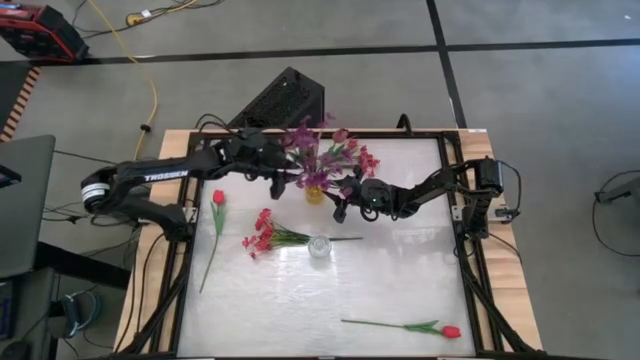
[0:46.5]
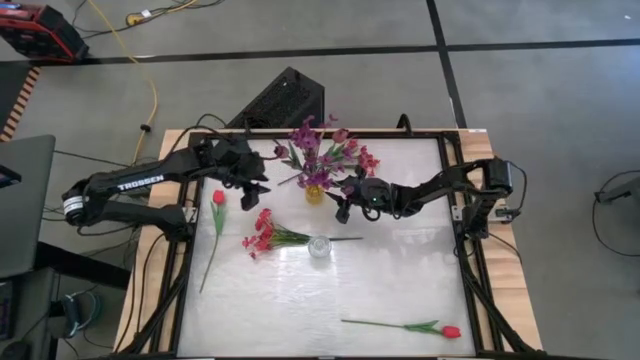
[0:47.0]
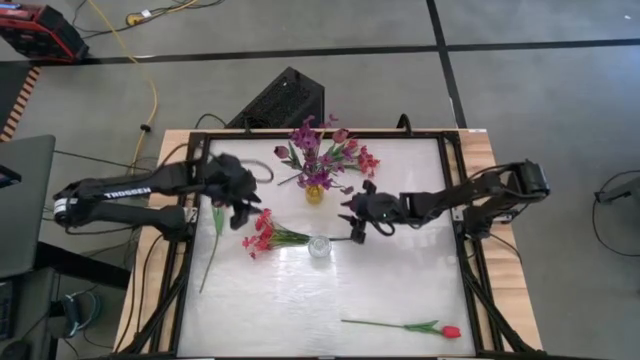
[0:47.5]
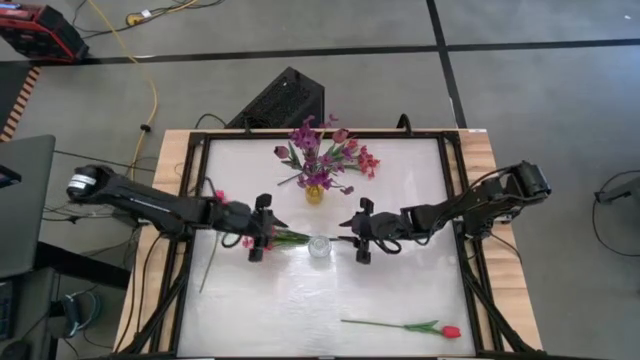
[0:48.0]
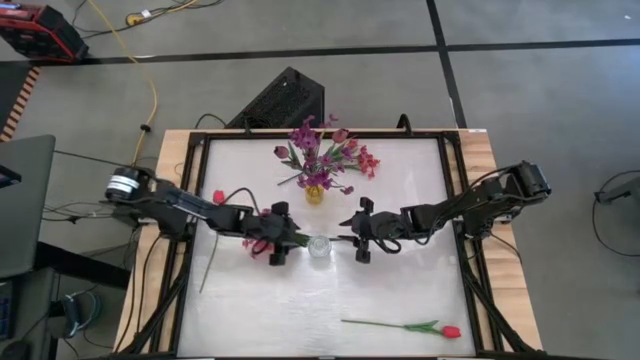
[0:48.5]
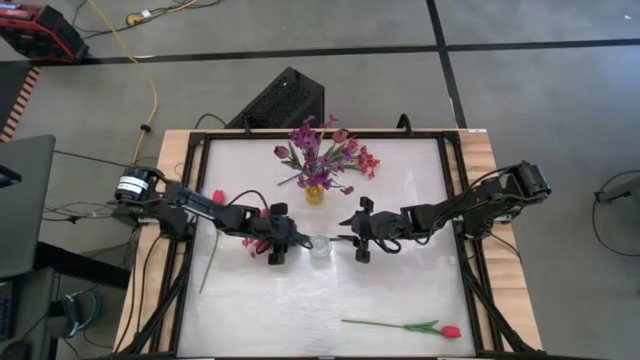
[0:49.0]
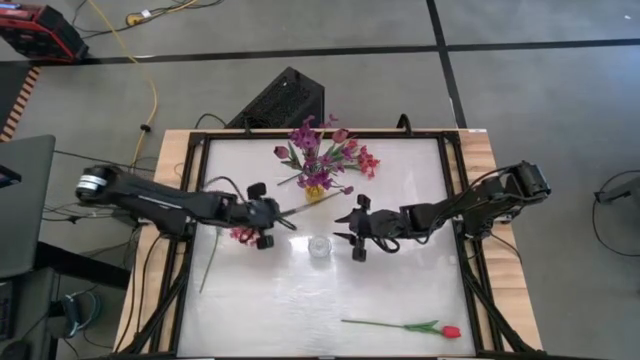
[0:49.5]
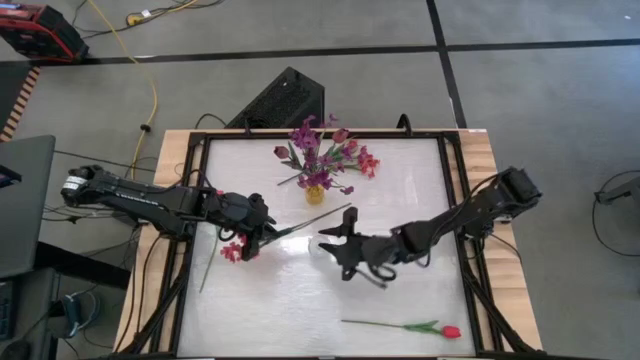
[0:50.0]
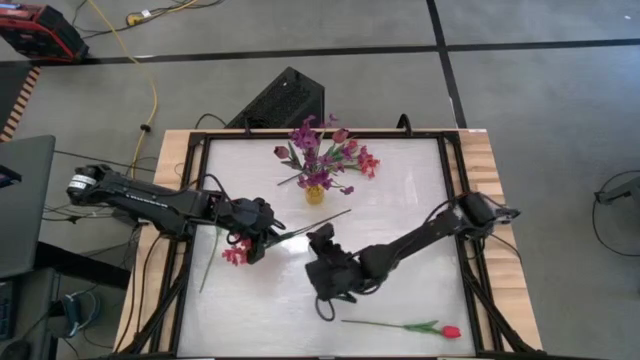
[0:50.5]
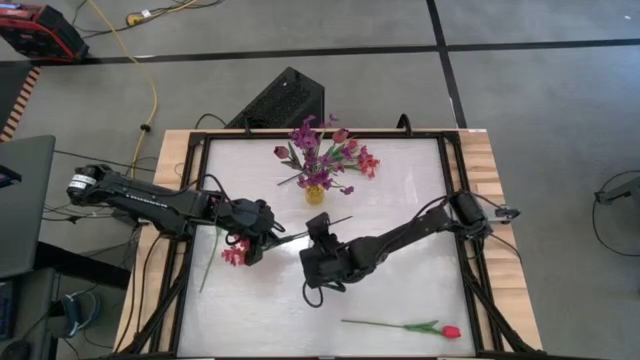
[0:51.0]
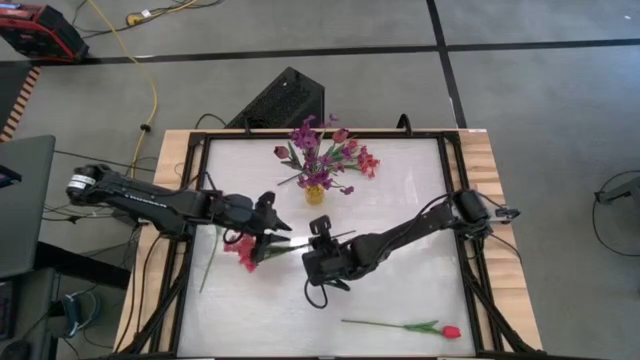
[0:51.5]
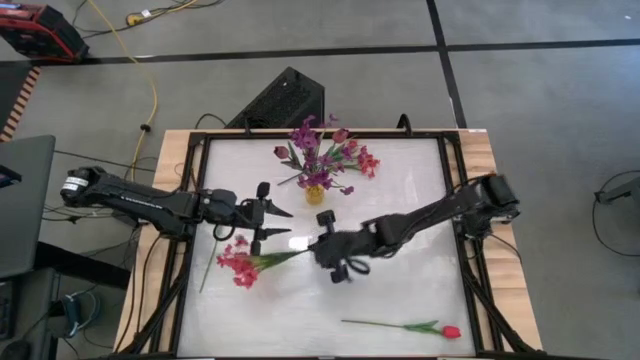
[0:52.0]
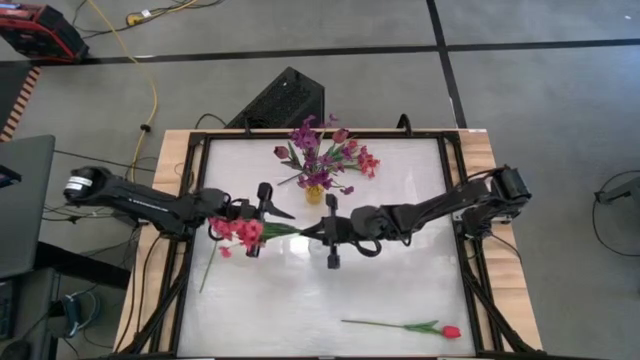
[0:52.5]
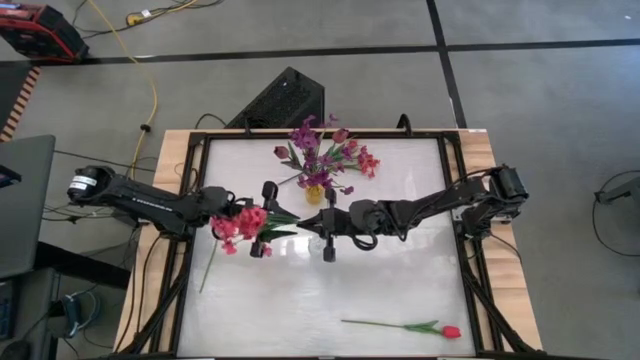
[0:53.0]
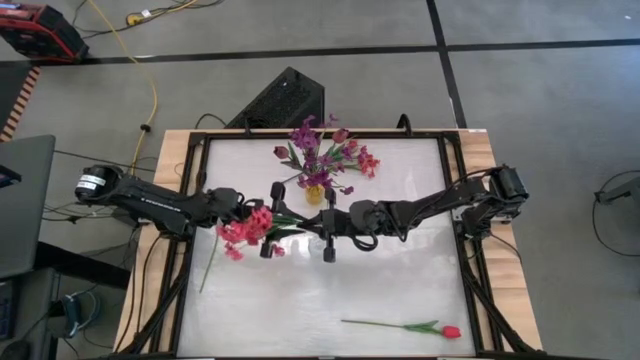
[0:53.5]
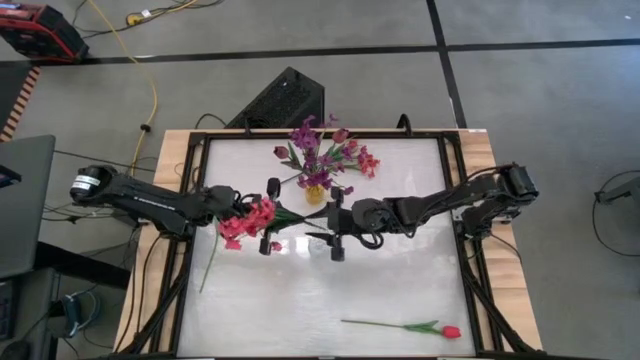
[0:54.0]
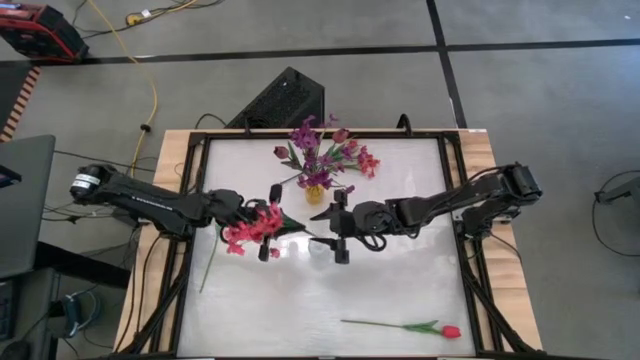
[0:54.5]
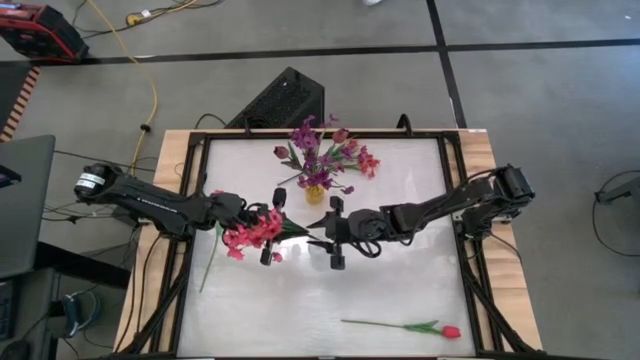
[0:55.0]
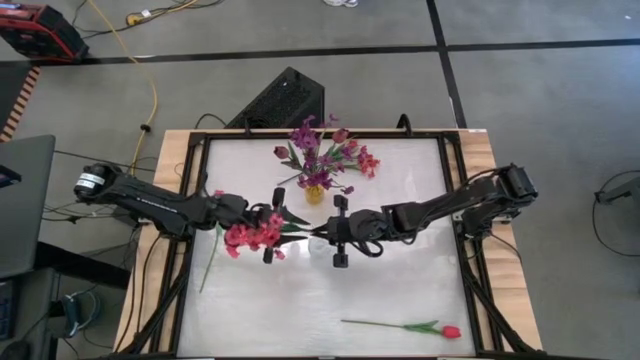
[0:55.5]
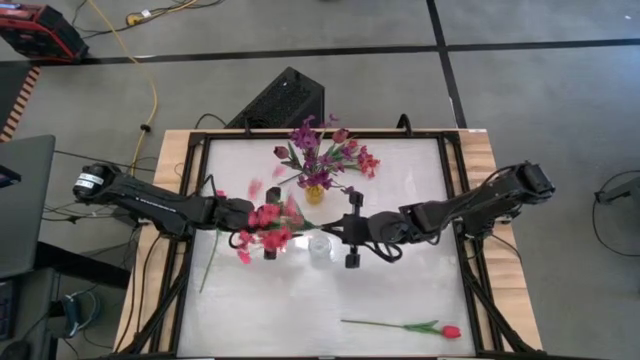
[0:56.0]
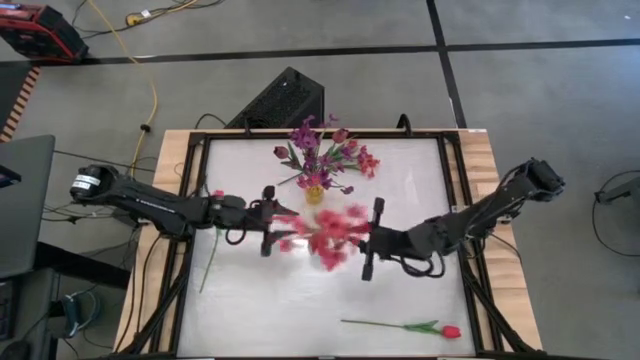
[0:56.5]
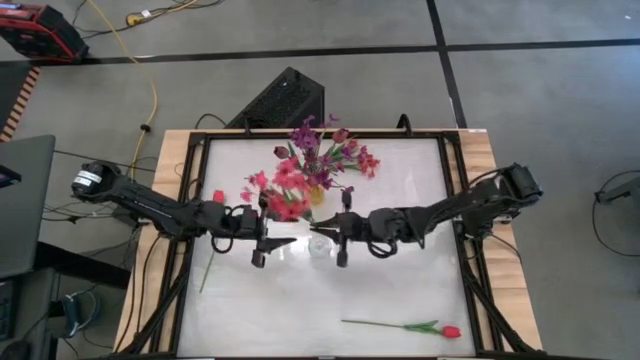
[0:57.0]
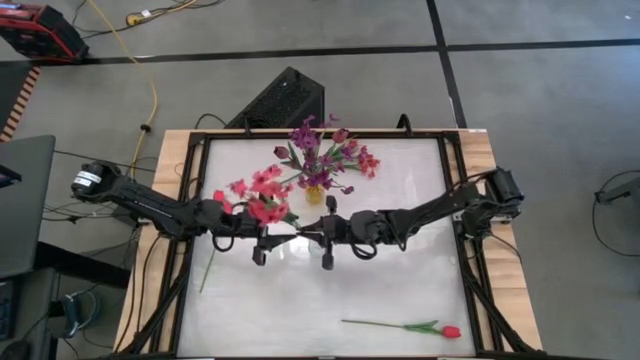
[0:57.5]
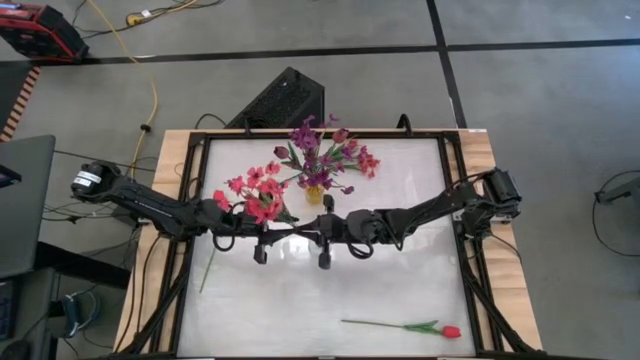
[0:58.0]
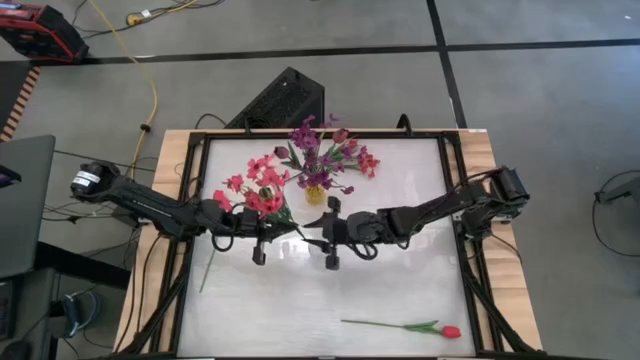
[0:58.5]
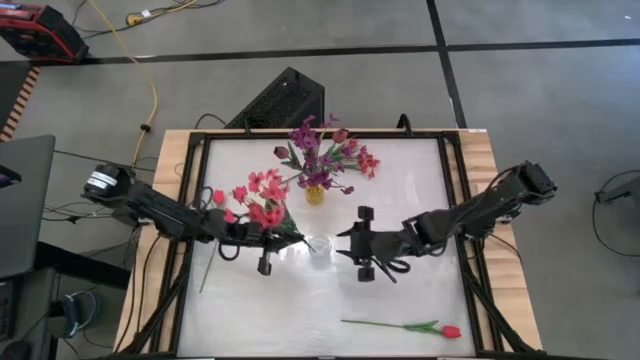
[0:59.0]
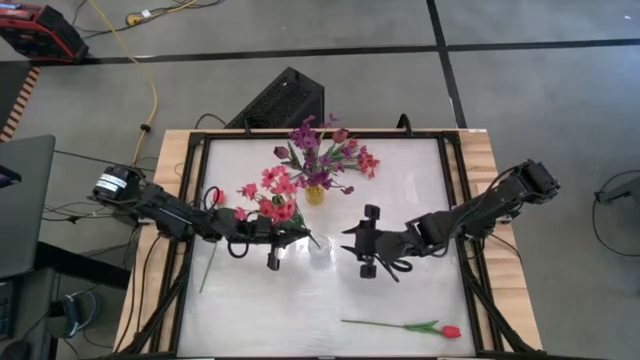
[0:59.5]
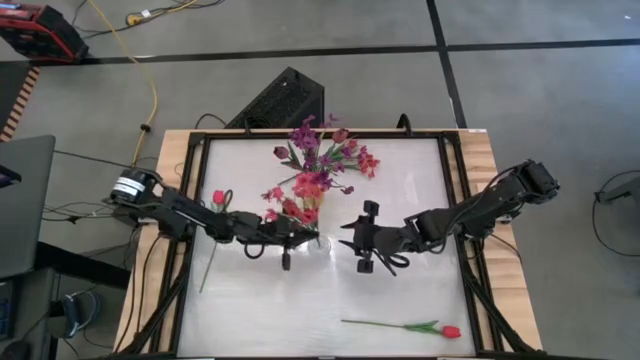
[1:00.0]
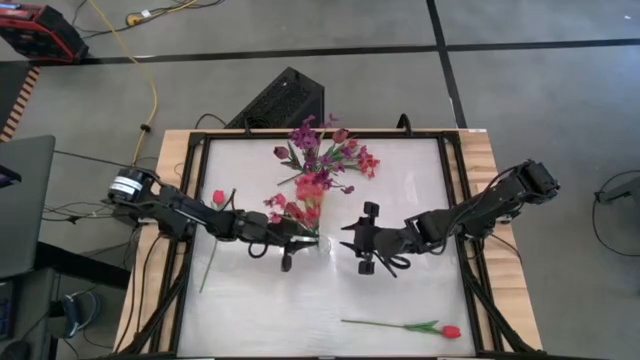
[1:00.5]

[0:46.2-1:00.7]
Task: Sort flowers into vase by color
Put the bottom pink flowers into the transparent vase

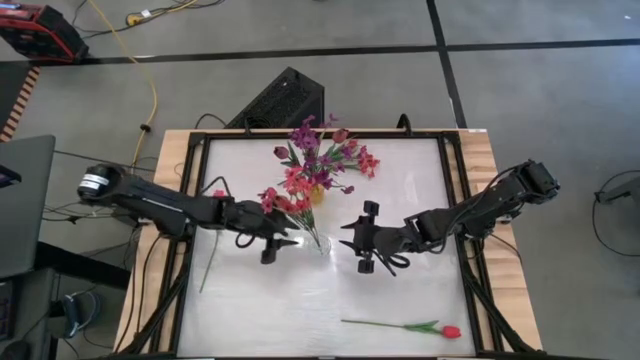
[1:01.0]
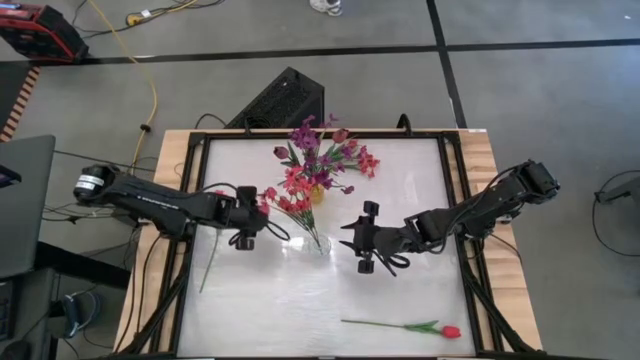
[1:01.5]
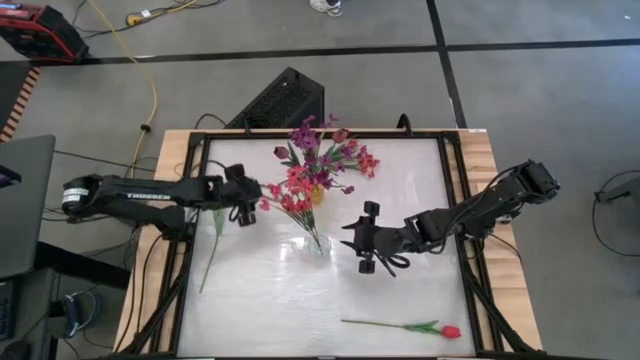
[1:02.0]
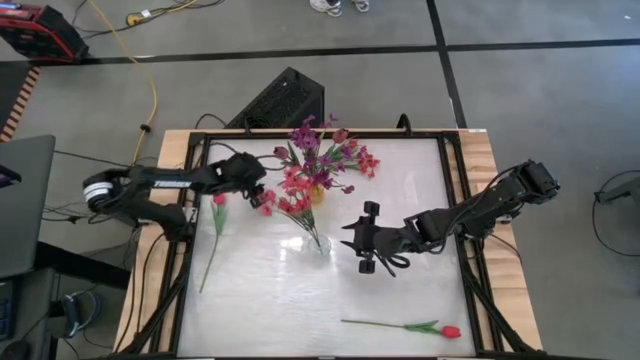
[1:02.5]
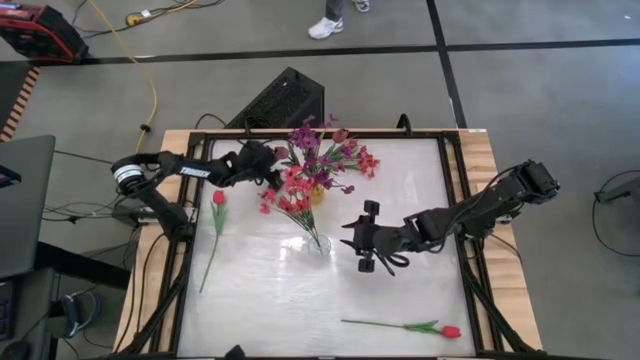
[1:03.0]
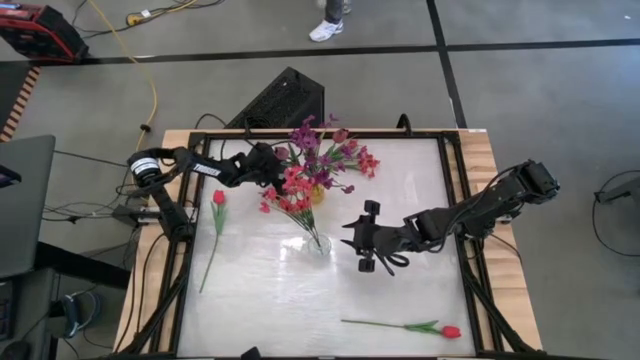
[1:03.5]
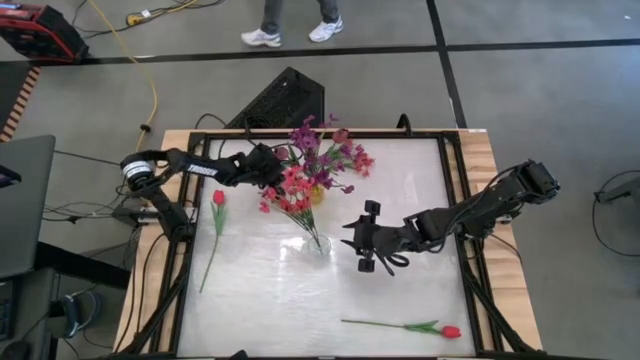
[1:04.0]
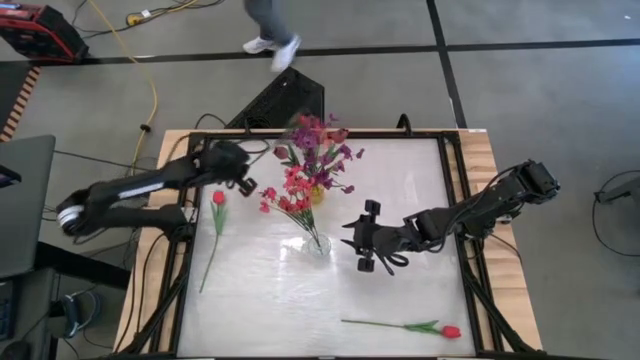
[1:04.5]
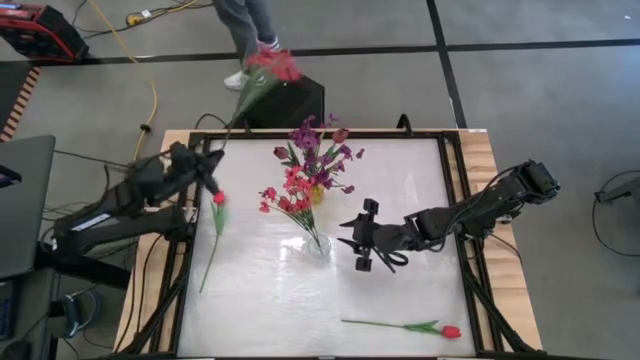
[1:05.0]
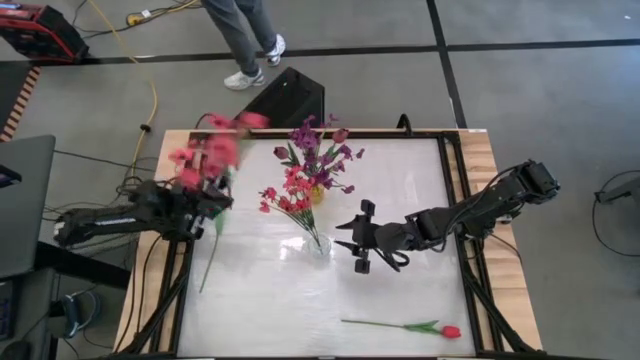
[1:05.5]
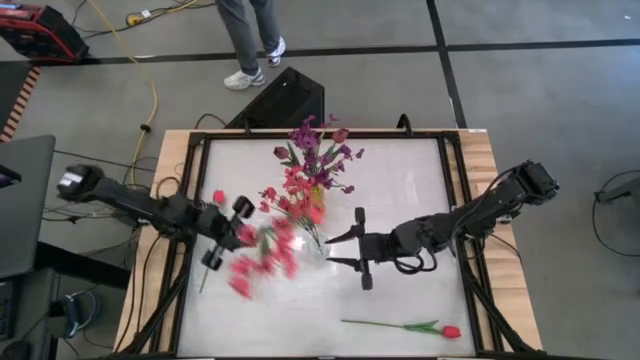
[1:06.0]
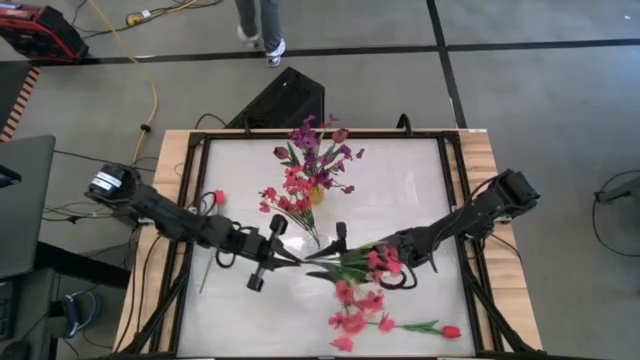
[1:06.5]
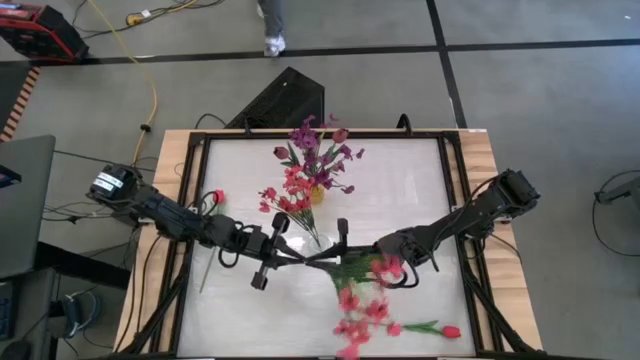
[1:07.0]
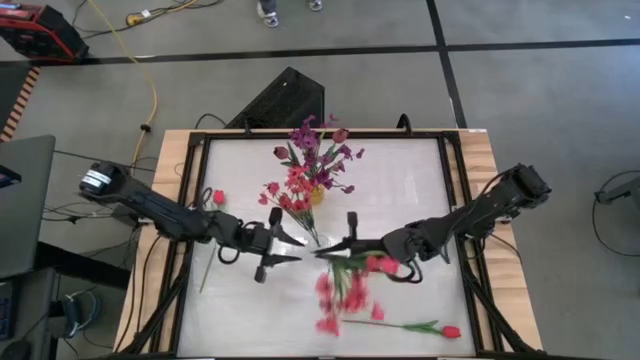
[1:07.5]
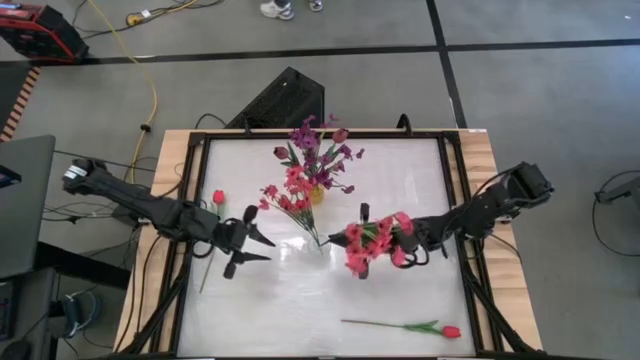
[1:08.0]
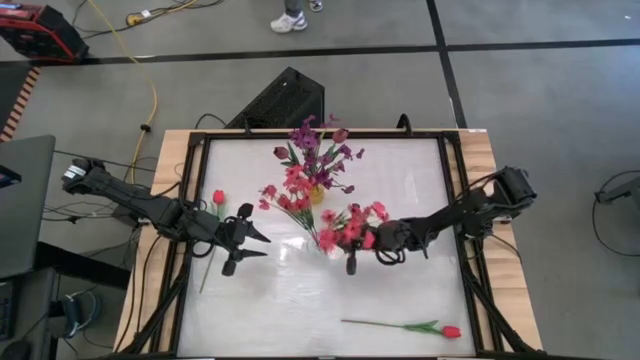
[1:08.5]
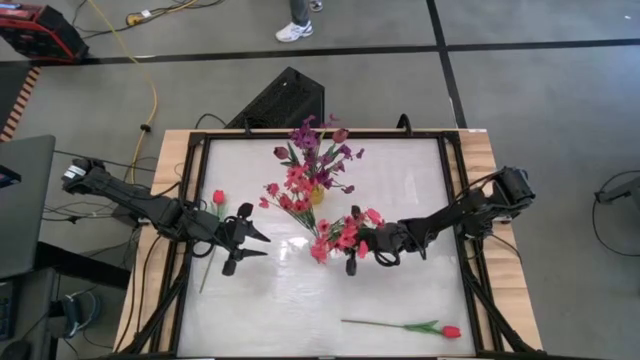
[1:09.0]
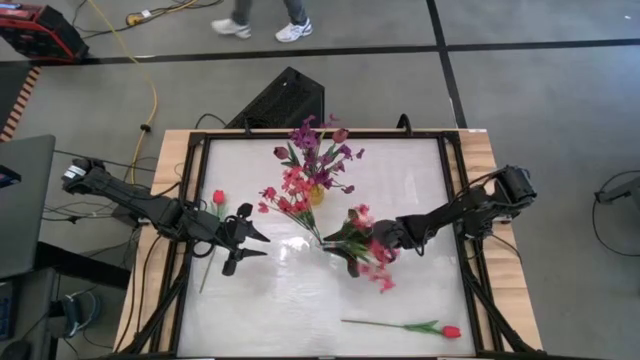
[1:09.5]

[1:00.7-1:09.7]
Put the pink flowers into the transparent vase
